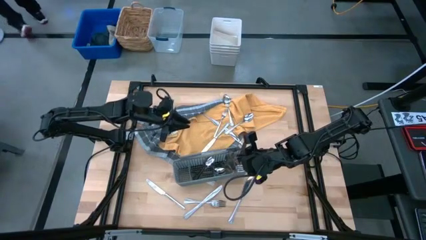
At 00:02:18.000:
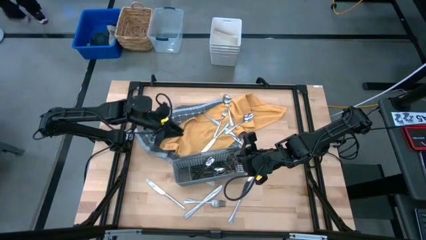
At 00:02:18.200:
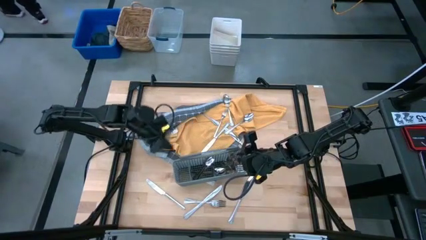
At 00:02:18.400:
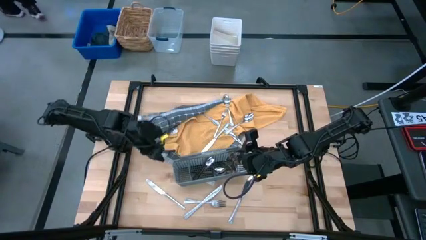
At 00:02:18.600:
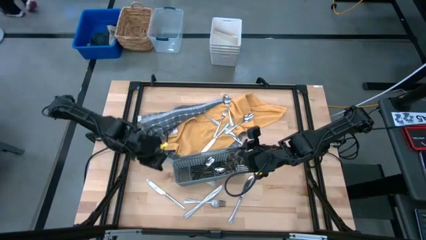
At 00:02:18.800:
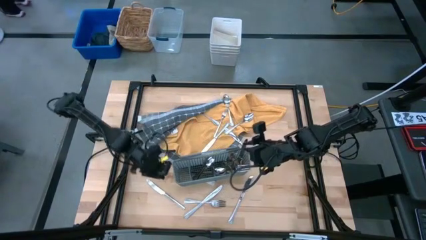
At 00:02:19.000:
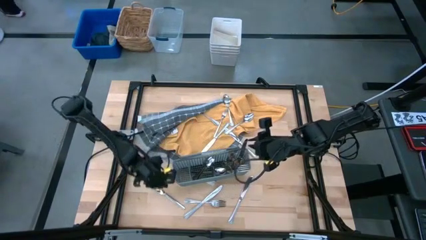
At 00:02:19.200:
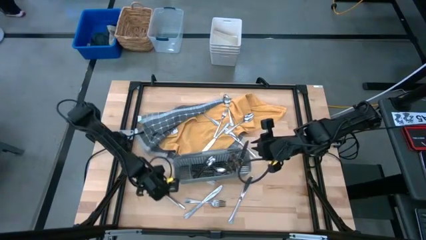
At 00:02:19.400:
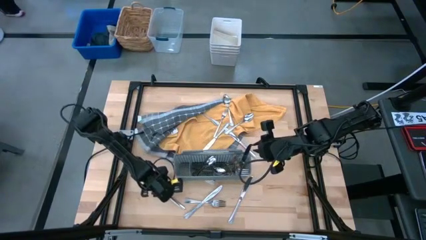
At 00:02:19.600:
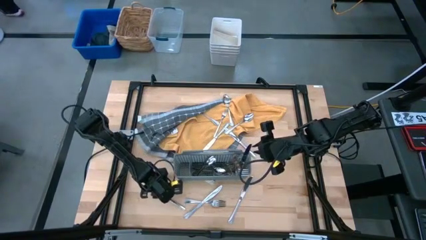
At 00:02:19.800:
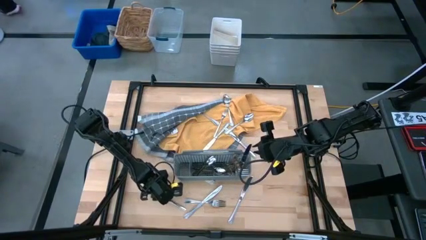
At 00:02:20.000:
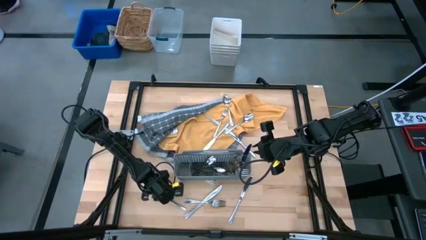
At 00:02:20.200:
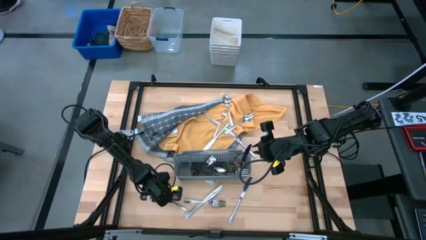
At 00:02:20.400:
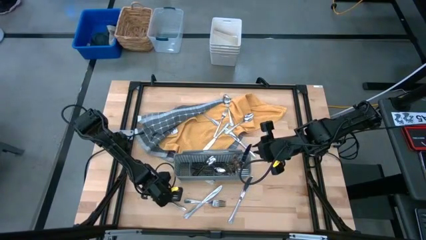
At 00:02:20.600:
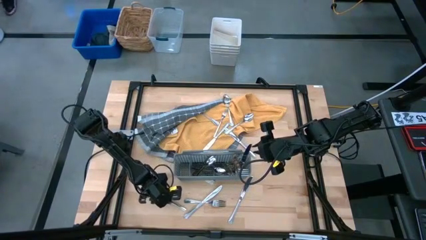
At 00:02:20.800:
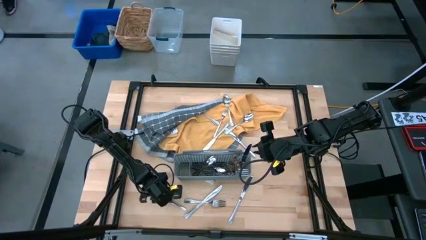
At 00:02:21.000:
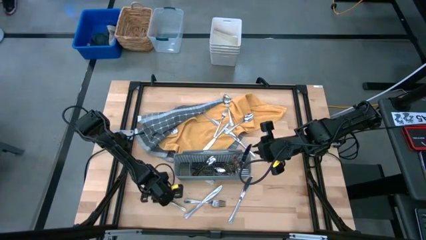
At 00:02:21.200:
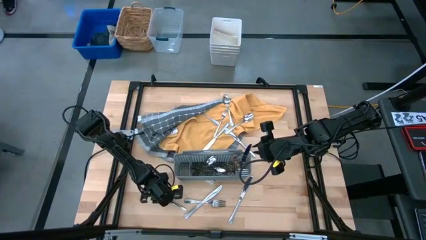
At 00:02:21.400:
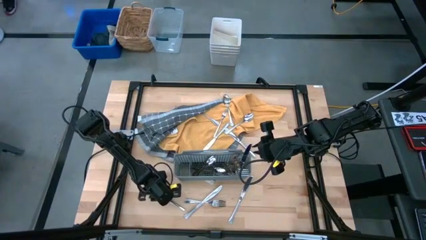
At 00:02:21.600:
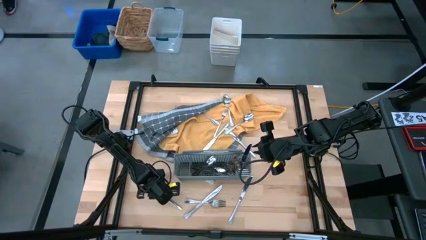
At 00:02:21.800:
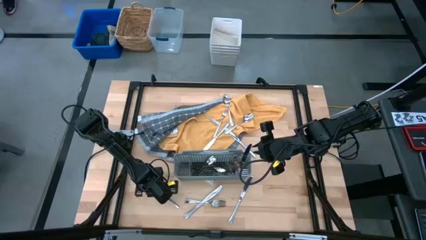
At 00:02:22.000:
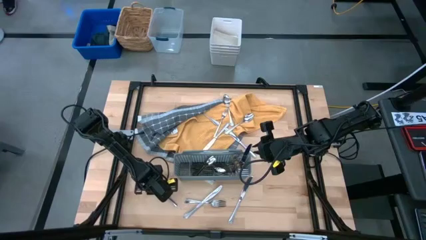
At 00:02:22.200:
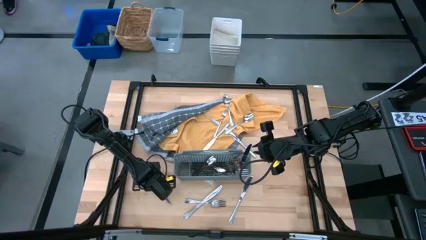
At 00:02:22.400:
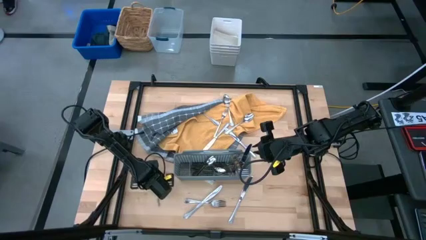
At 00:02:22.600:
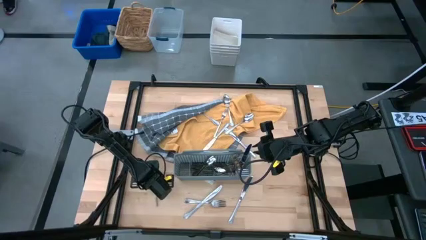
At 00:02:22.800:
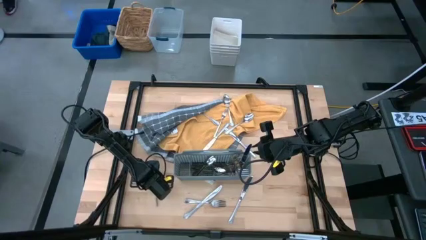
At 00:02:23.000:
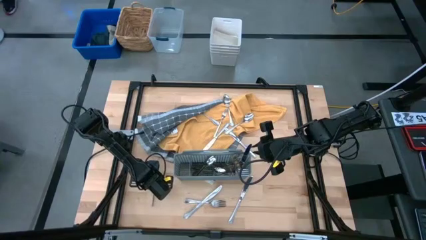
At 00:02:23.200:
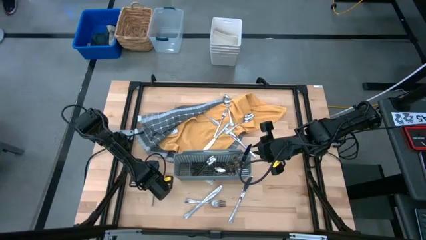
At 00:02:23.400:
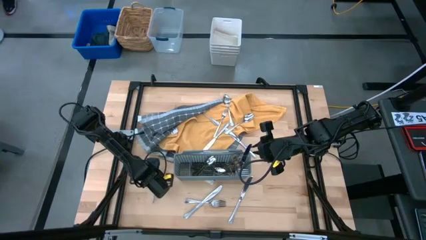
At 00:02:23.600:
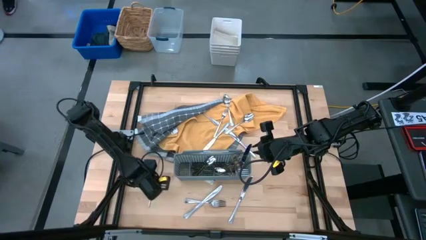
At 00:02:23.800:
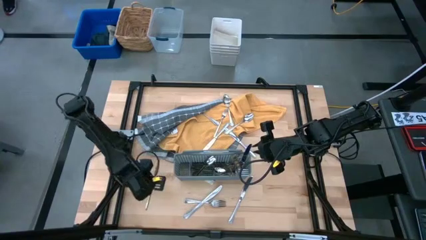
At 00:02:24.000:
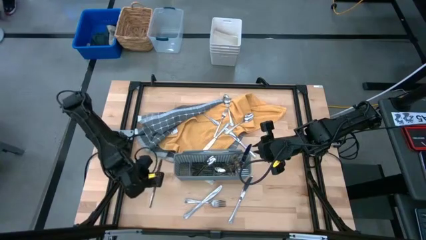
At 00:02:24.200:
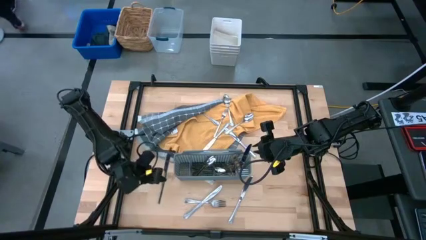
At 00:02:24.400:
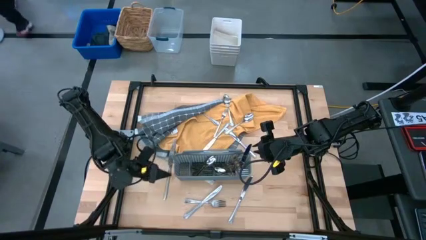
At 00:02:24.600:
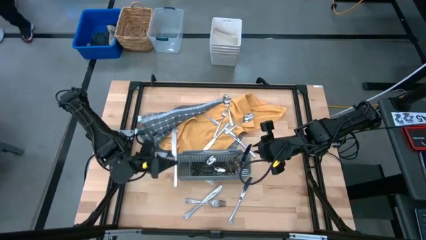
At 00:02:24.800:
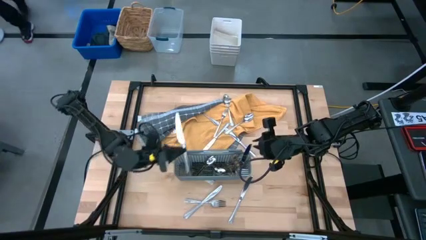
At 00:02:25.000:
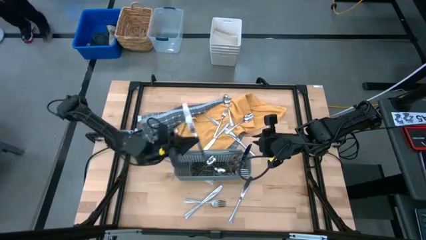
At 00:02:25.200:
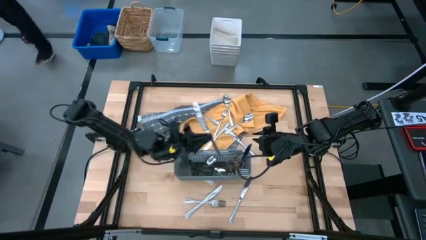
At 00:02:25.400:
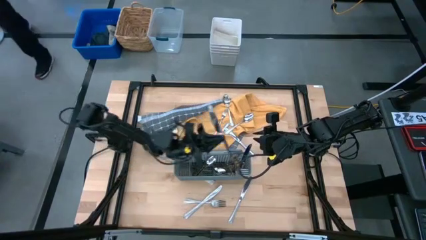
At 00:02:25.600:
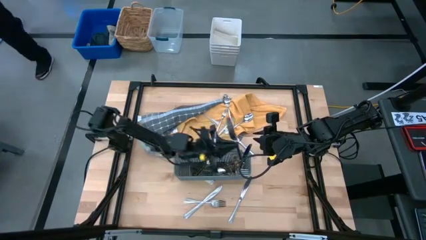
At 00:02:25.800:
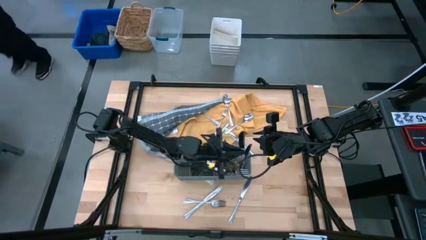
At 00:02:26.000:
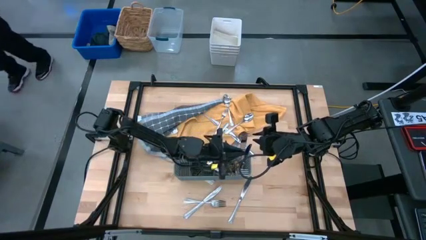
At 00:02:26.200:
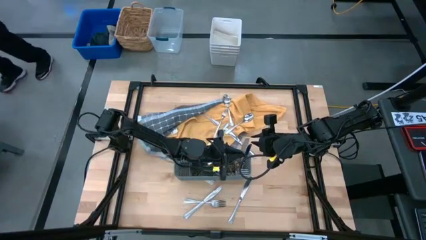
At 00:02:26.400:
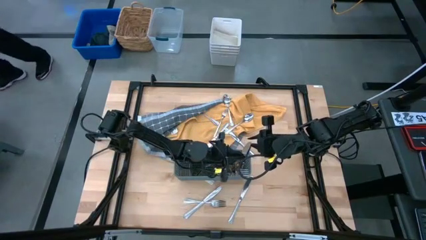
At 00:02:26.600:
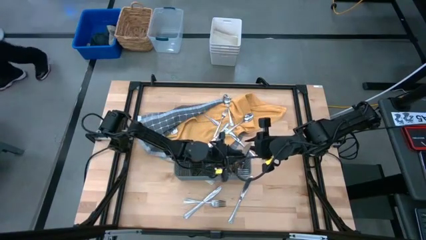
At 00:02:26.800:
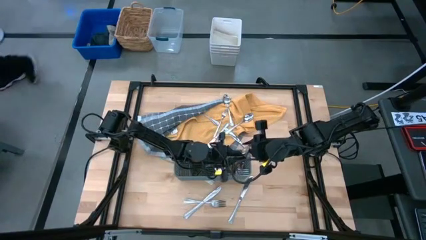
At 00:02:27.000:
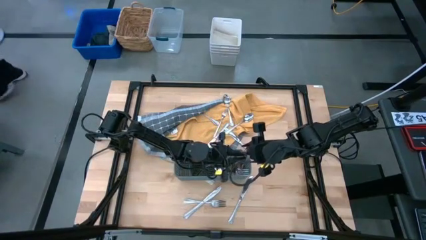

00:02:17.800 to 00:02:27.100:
Task: Sort silverware
Put the silver knife into the gray silverware basket

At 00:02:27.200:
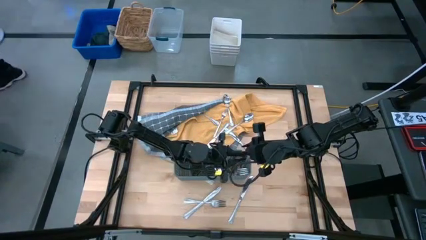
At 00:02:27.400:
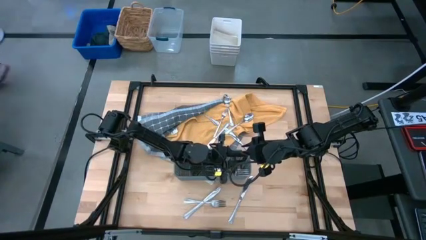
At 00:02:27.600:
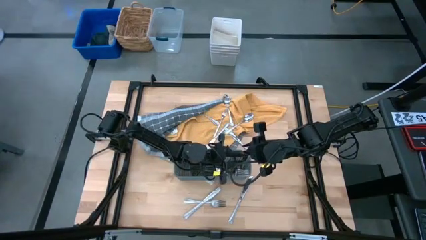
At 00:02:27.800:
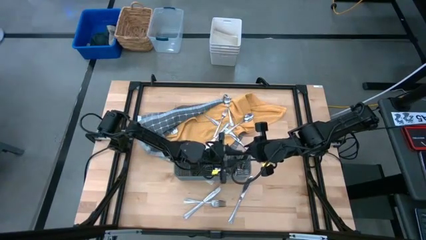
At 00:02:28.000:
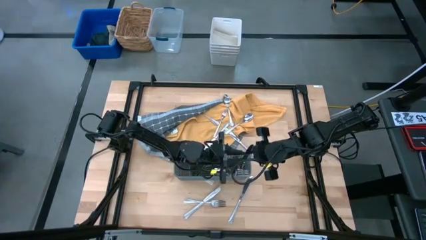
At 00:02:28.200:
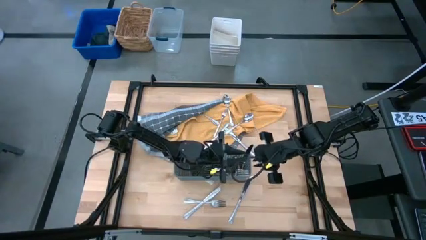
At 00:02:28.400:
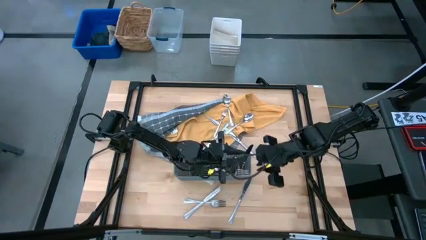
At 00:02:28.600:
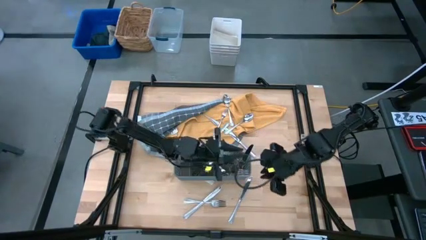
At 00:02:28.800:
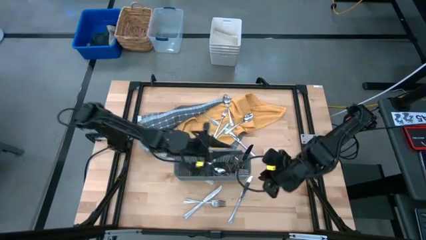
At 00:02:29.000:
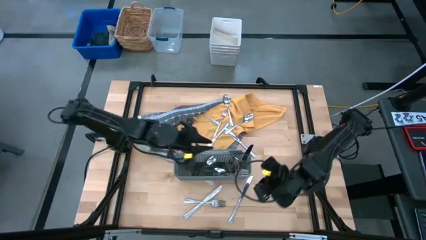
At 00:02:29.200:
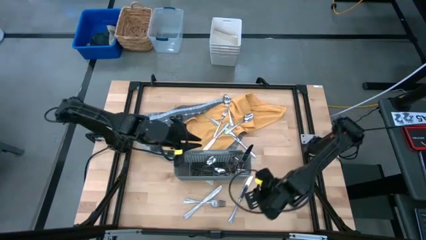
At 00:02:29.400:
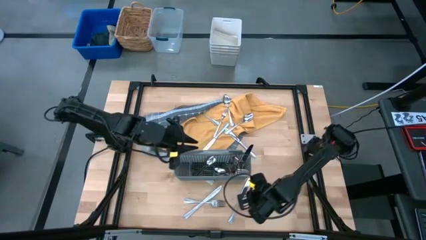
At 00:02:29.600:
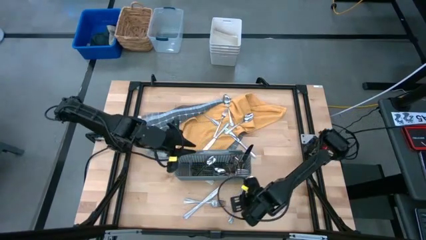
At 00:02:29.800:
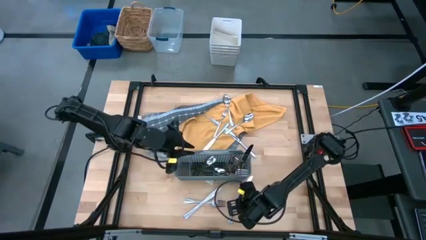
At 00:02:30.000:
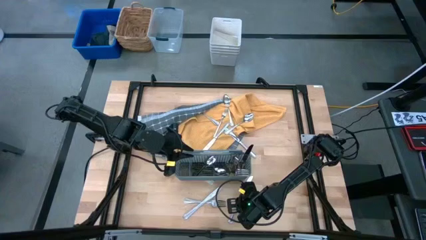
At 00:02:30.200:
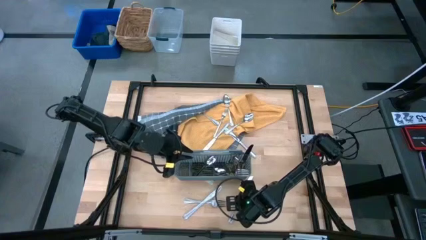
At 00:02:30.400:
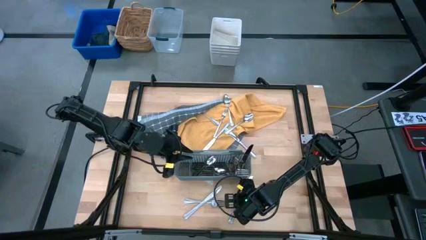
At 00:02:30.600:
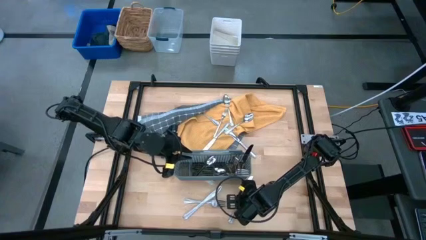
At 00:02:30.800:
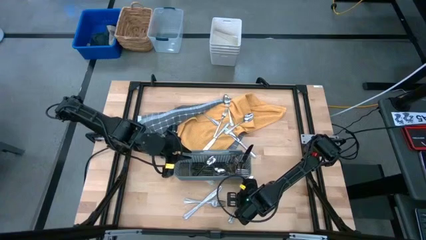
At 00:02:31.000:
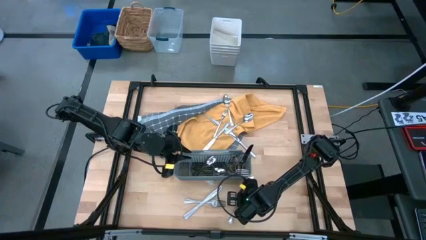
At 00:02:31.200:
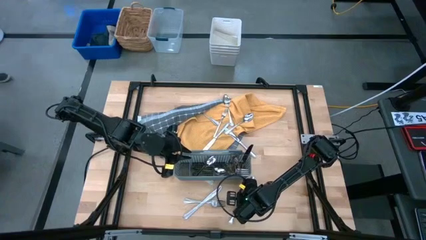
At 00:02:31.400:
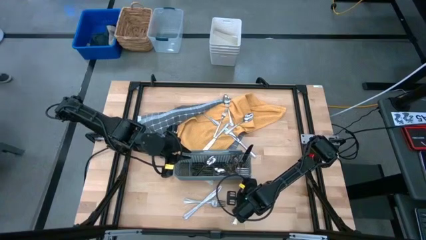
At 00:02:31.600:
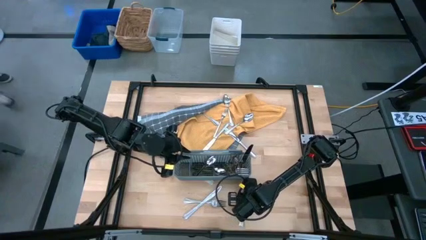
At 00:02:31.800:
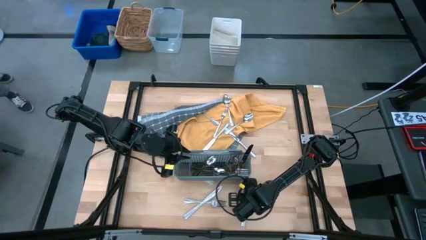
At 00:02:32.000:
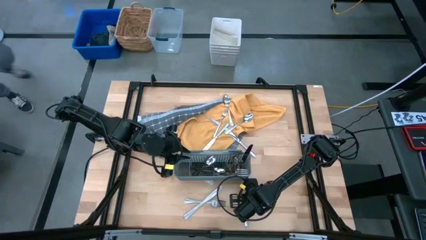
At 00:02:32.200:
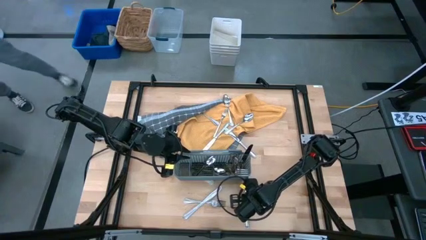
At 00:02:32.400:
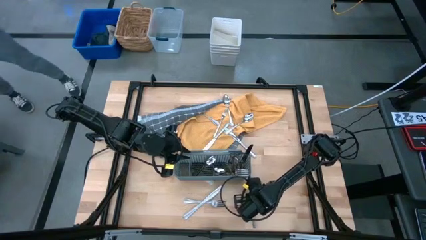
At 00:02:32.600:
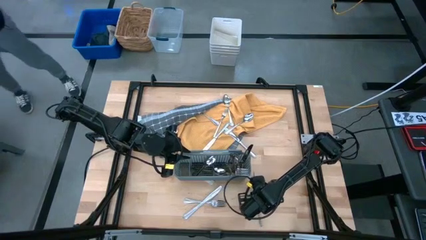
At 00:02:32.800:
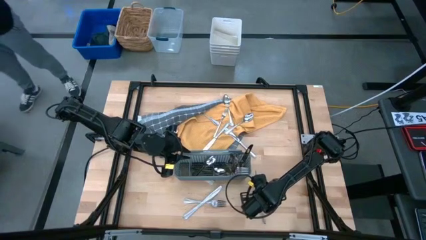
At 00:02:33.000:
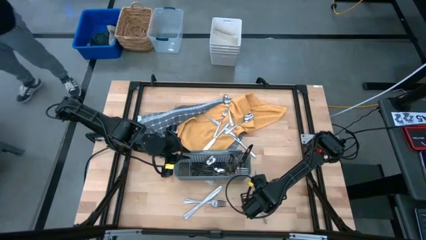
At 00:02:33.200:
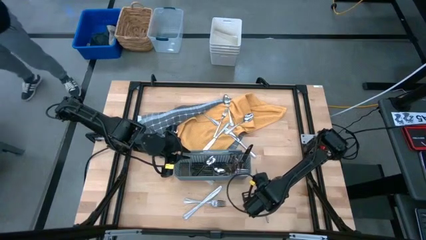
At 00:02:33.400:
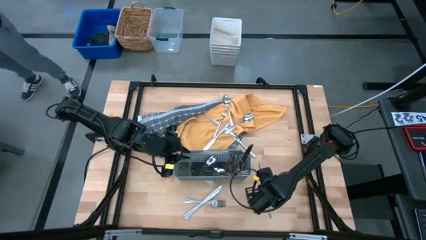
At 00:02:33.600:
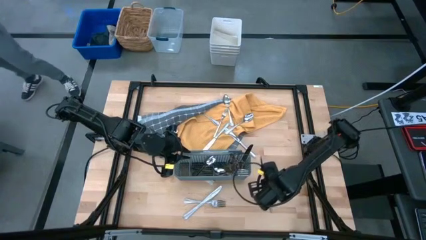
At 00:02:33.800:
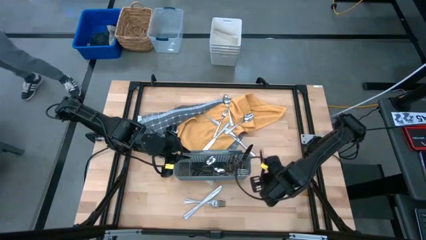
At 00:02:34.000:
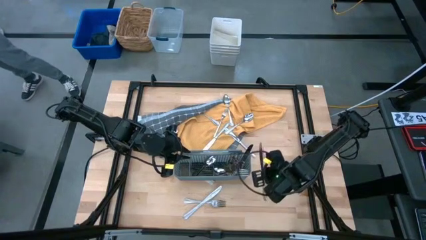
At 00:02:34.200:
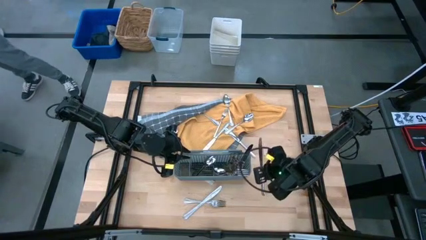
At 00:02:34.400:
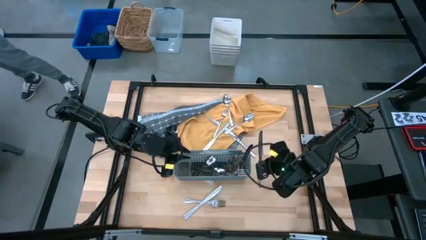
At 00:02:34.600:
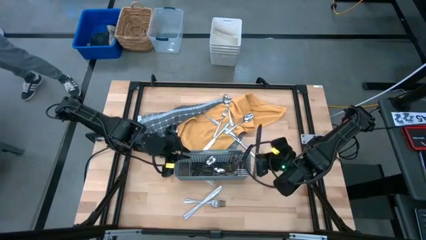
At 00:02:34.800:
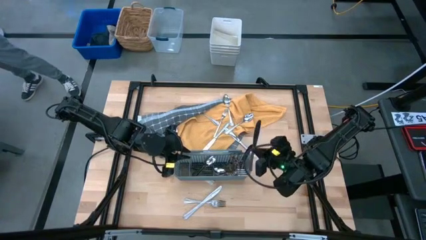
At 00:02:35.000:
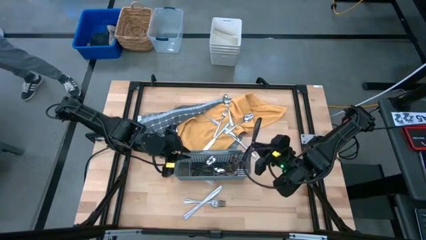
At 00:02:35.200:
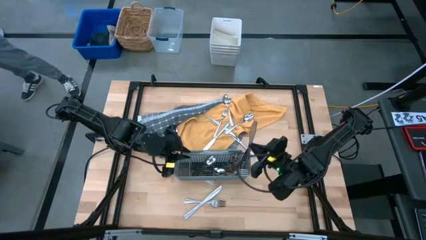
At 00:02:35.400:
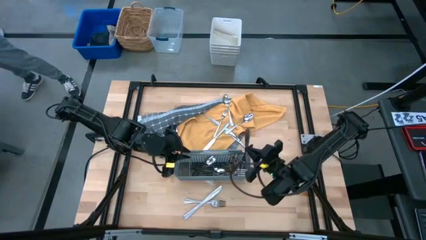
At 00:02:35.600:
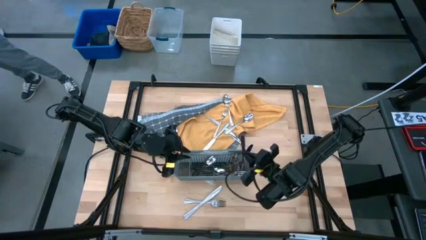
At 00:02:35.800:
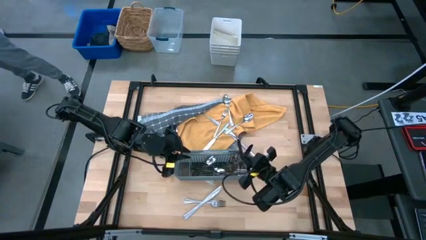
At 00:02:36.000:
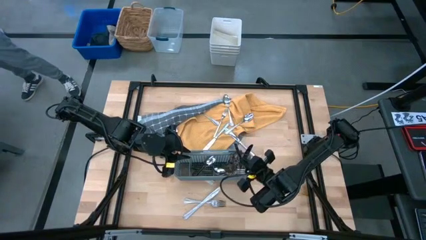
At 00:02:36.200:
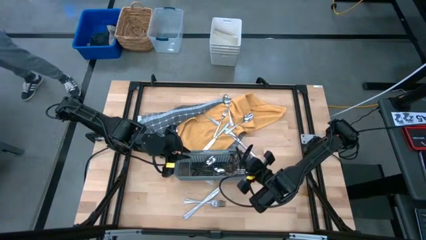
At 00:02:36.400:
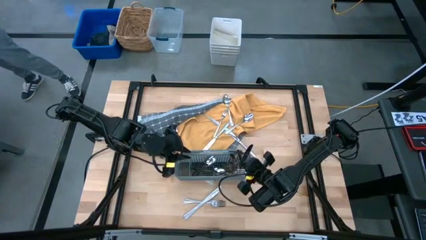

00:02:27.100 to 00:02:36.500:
Put the silver knife into the gray silverware basket
